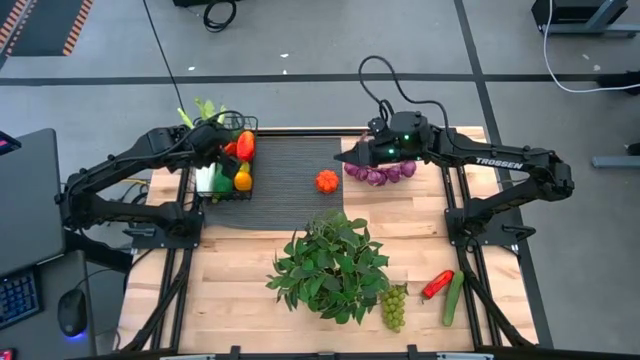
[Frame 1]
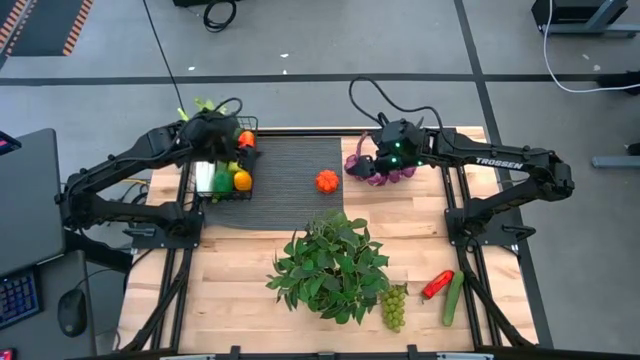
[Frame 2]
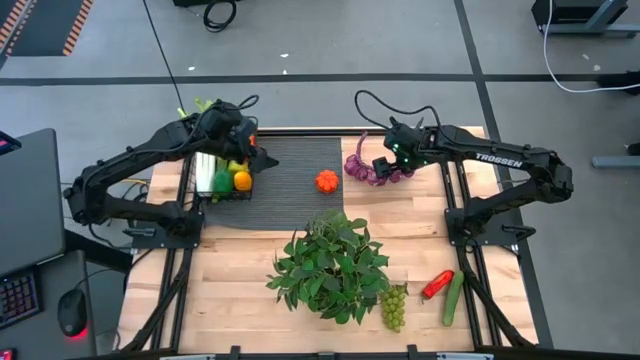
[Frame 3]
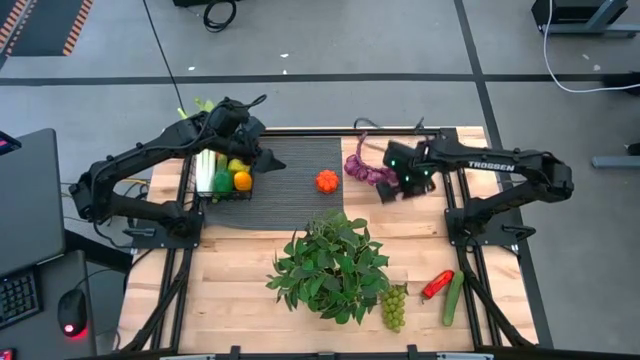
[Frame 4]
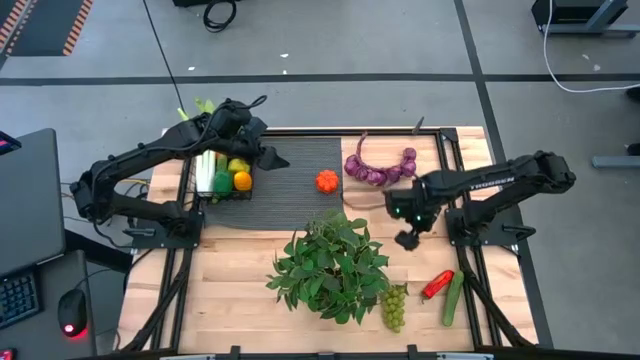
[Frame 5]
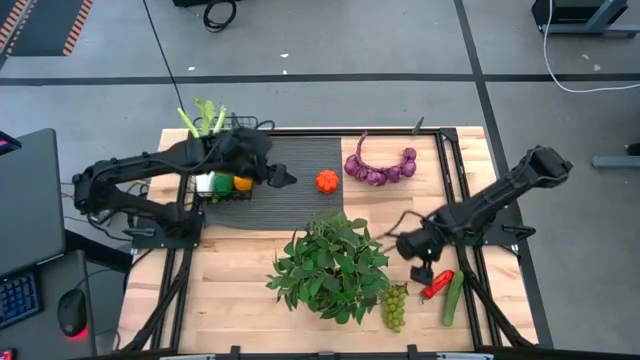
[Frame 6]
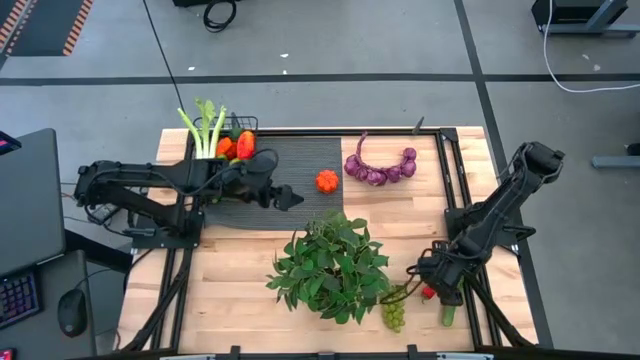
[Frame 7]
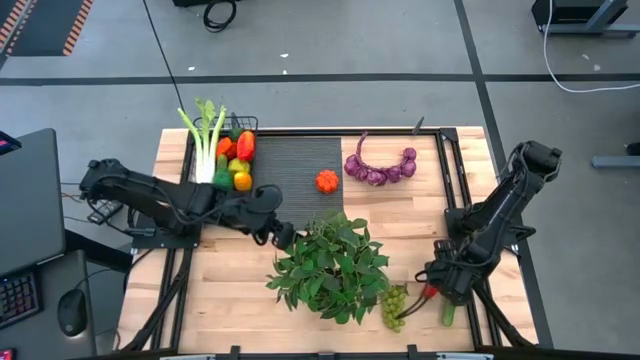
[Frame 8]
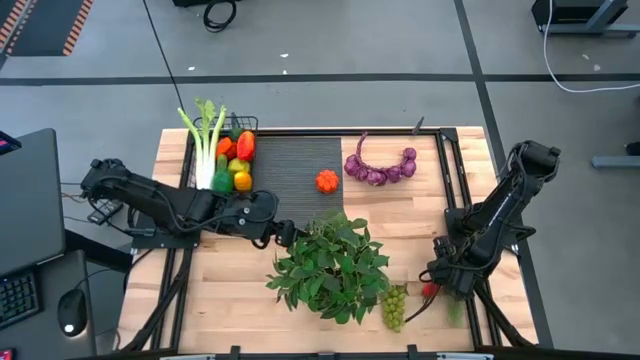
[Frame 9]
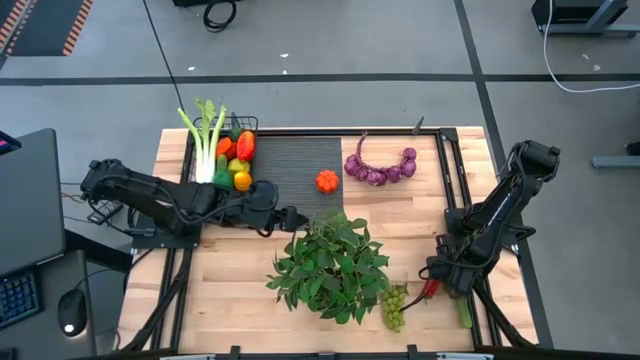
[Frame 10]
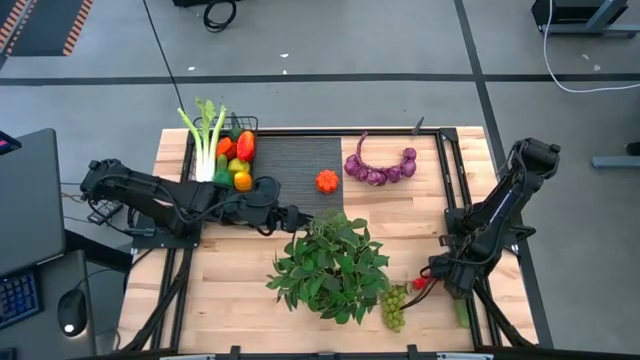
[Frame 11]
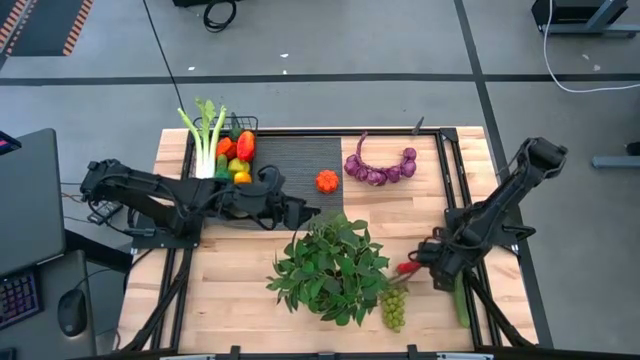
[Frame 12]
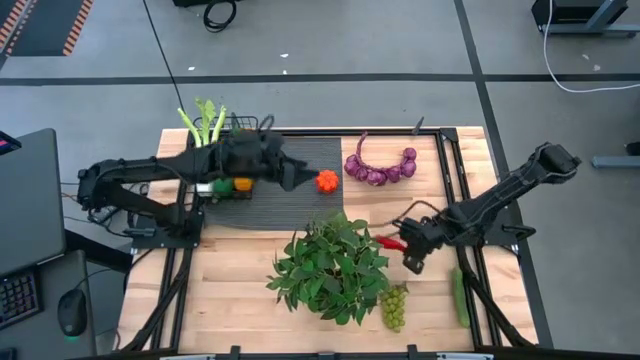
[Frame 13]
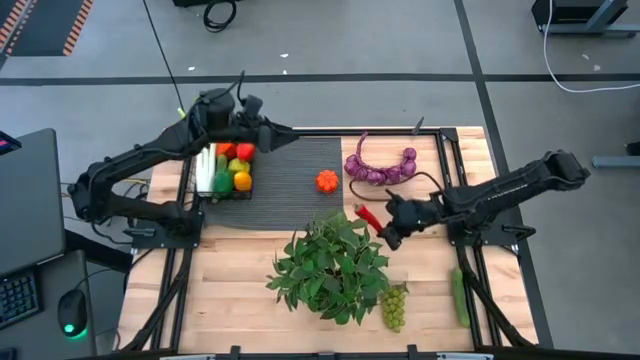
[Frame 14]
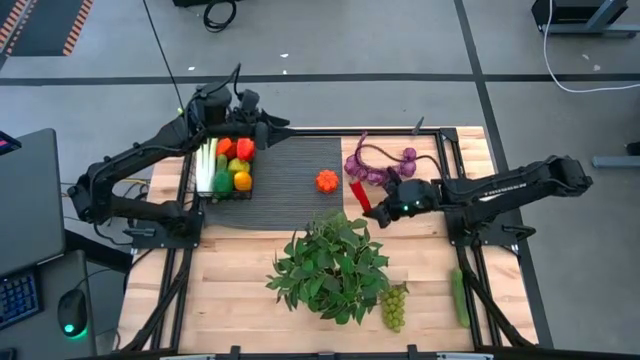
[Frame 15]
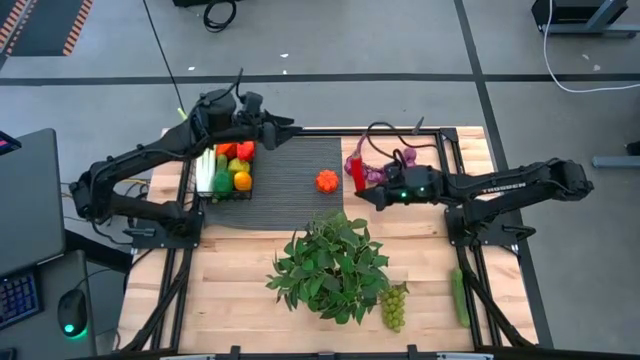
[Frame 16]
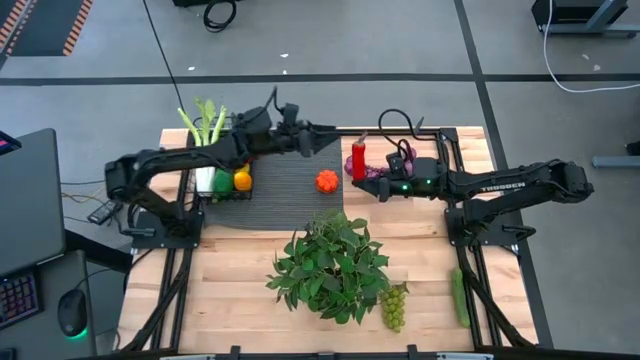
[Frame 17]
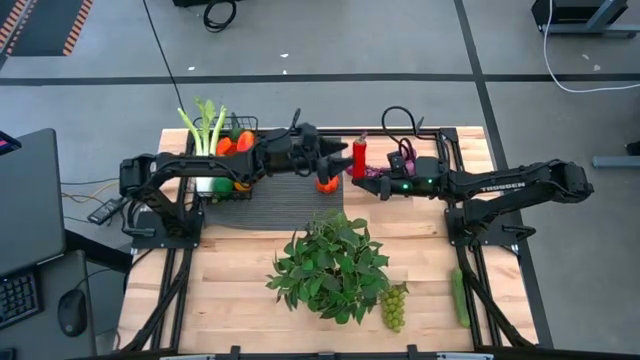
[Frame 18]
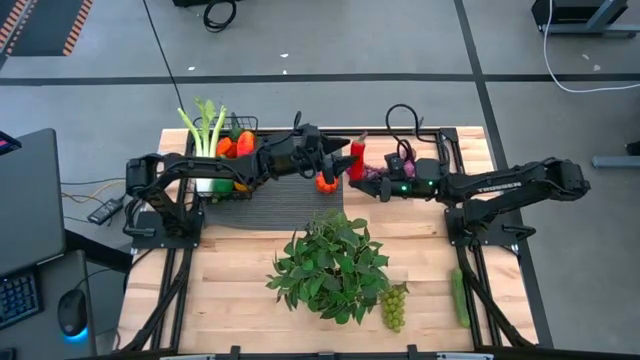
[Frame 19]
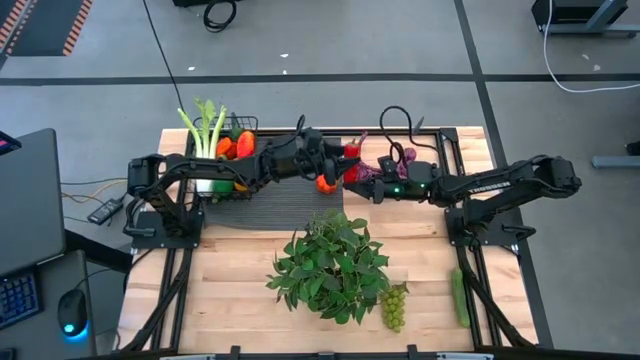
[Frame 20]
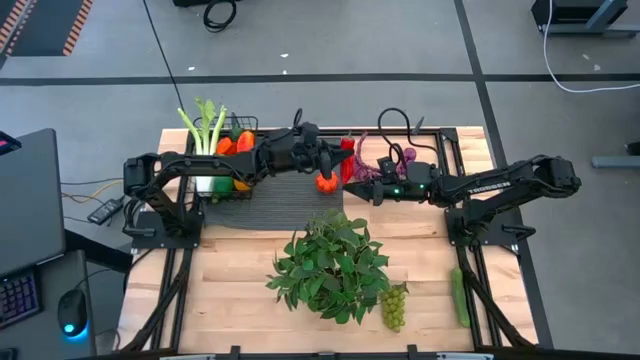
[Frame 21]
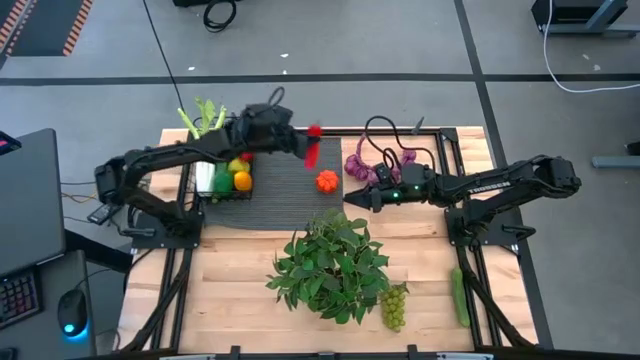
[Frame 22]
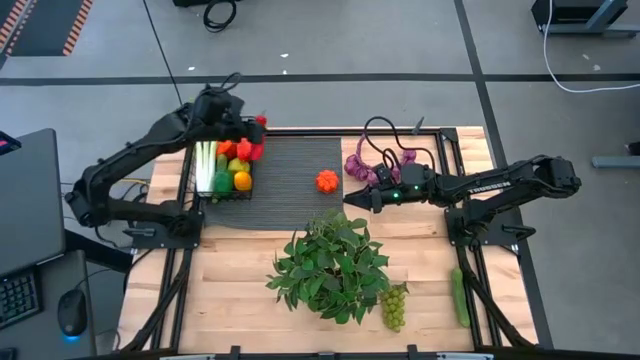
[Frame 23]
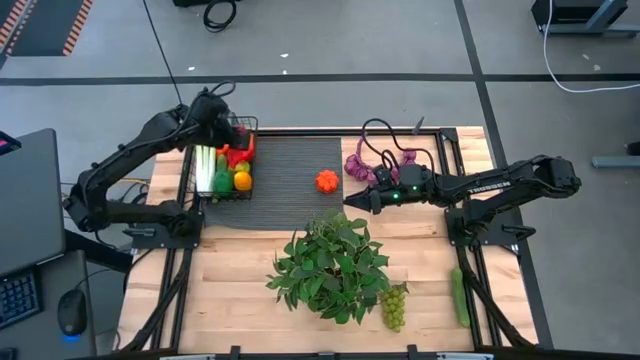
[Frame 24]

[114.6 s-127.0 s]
Task: Build produce basket
Put the red chili pepper into the wire basket

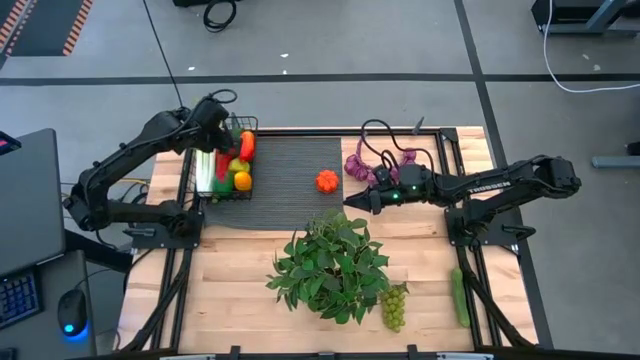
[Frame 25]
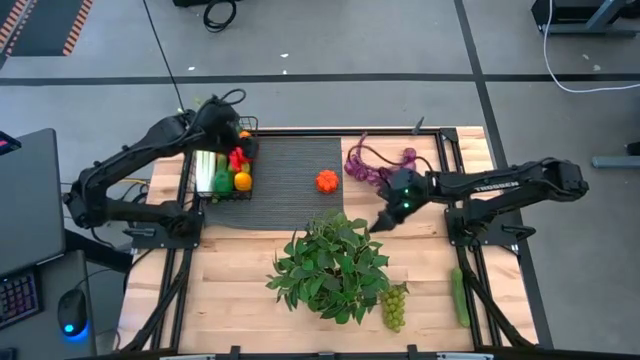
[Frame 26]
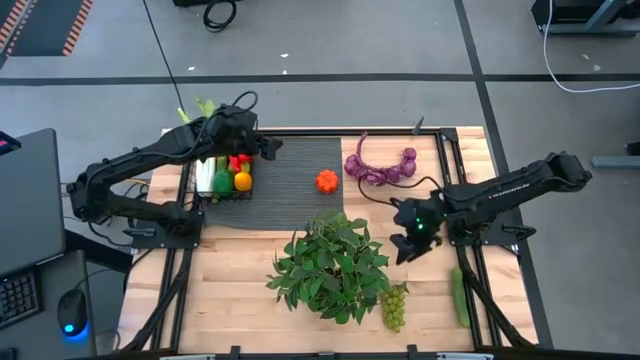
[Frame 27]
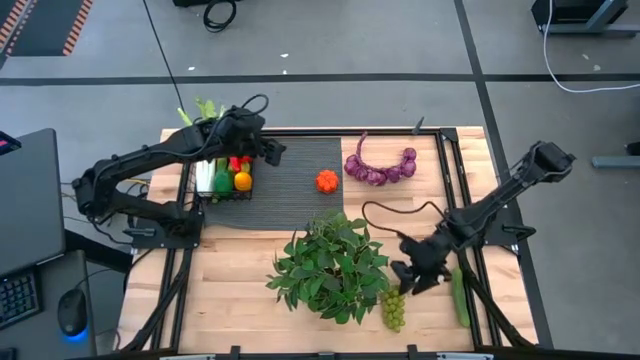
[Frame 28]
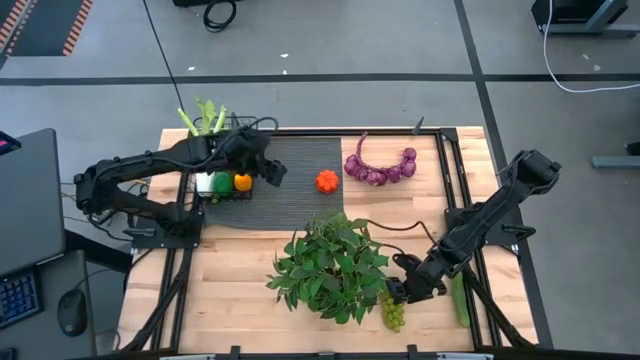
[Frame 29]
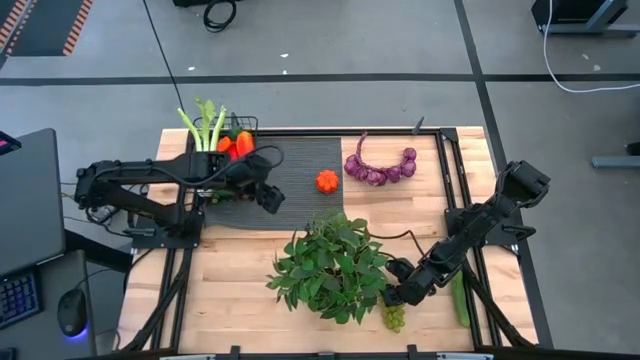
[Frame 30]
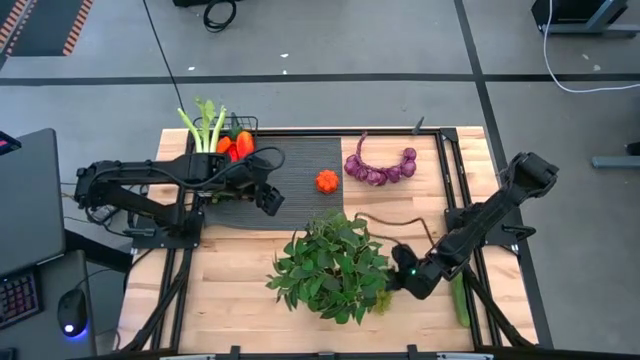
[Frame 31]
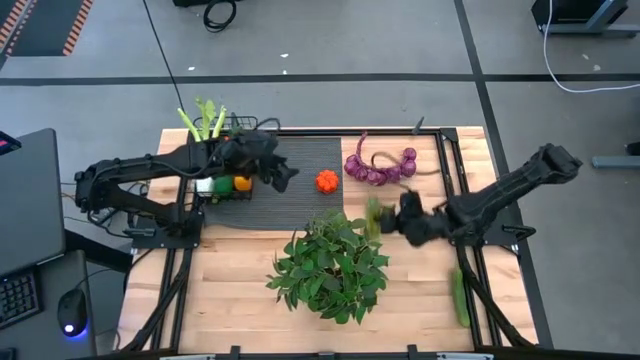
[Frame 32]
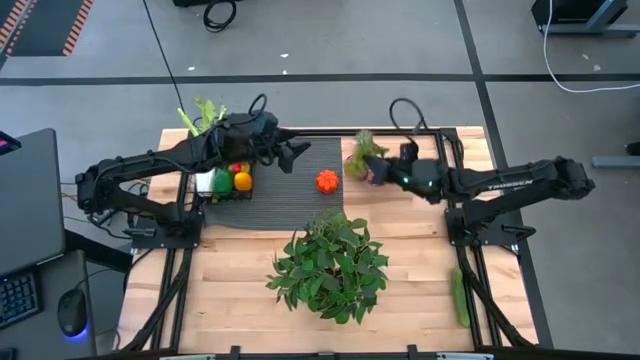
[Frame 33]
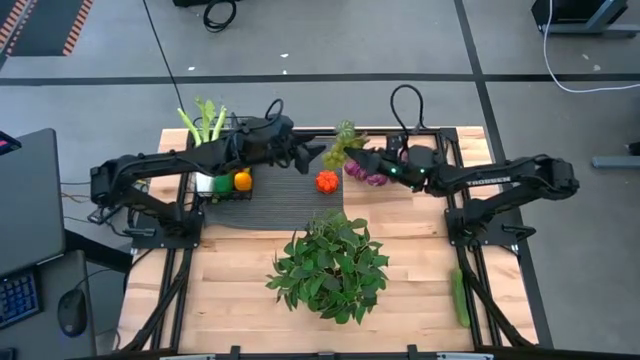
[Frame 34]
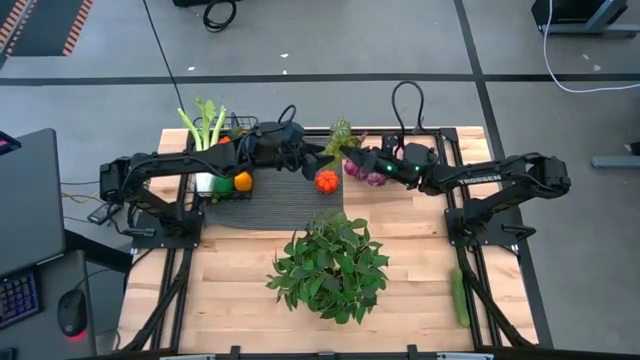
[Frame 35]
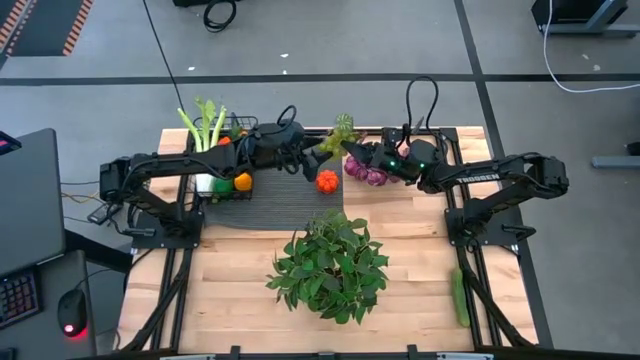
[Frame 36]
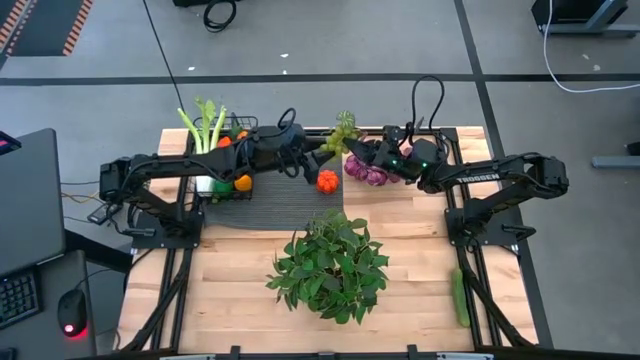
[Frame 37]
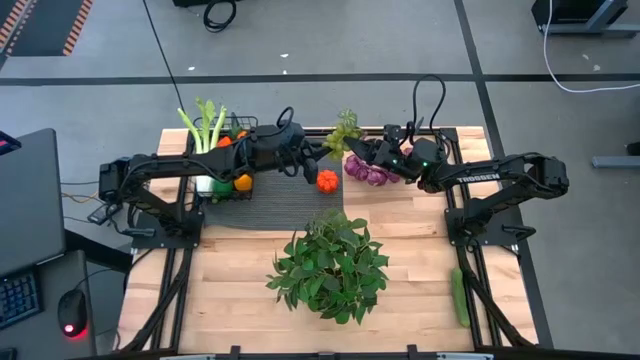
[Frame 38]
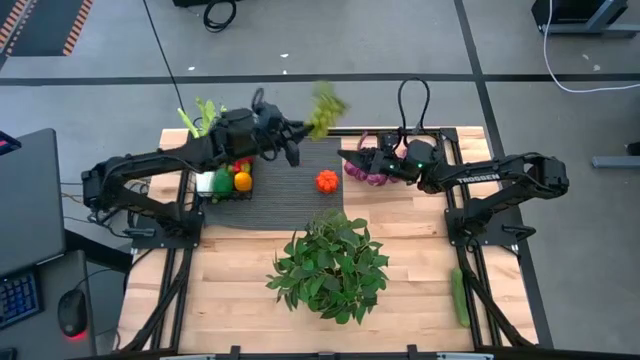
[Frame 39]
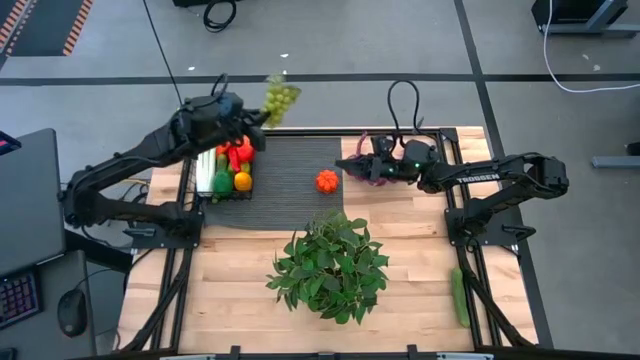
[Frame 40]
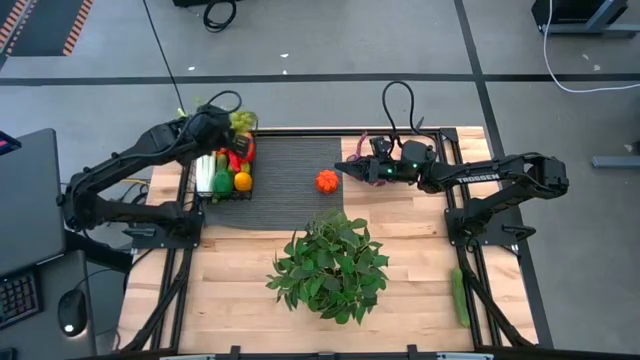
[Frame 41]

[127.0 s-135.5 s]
Put the green grapes into the wire basket
